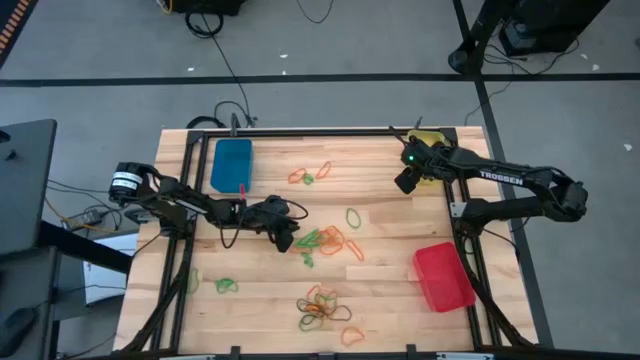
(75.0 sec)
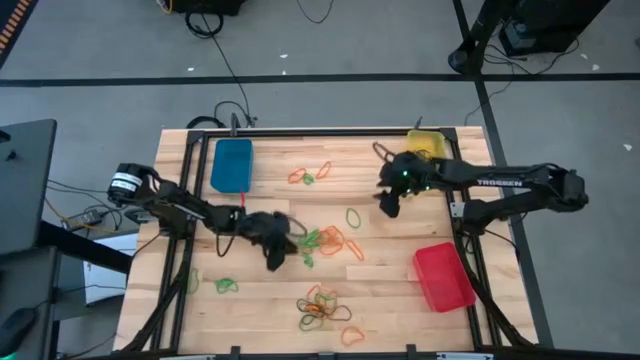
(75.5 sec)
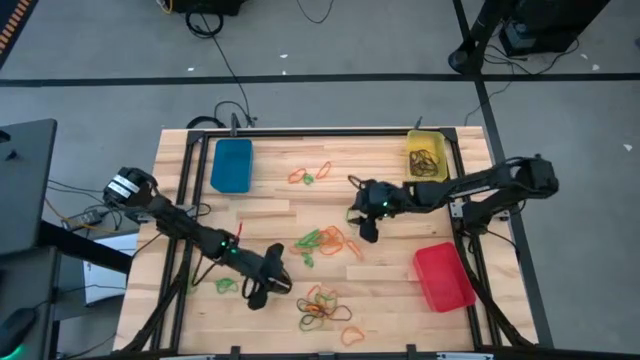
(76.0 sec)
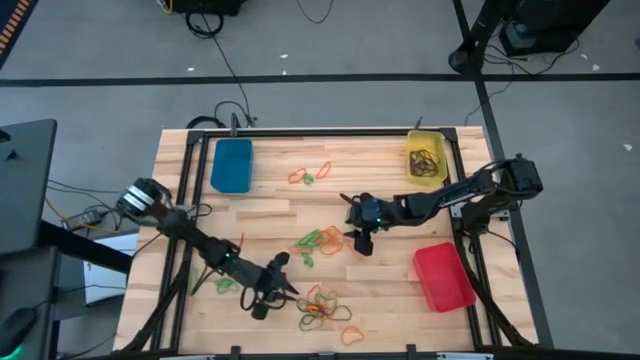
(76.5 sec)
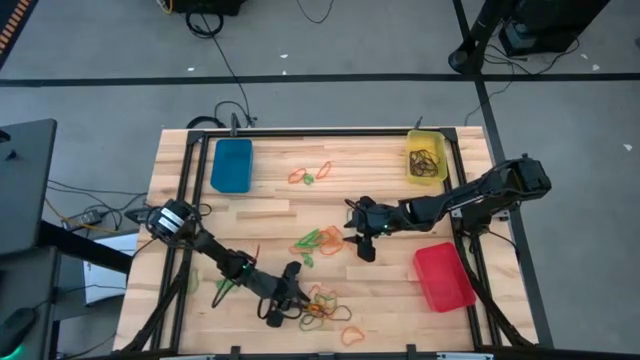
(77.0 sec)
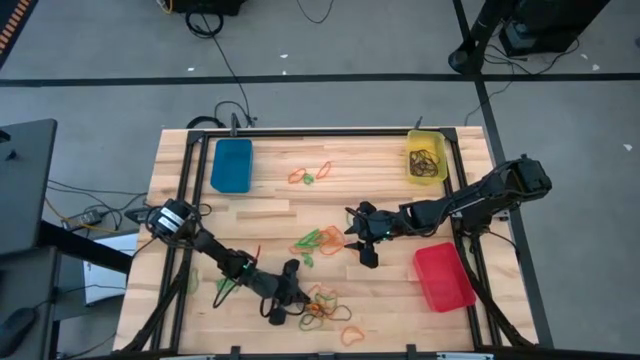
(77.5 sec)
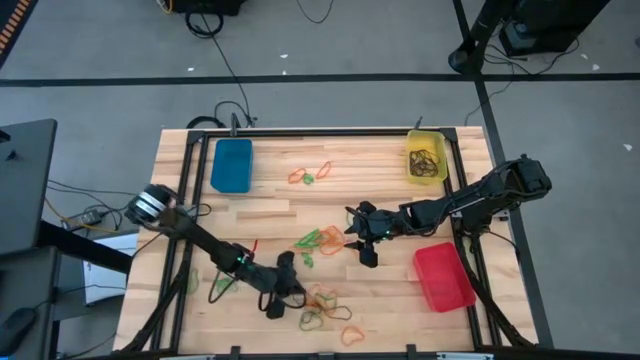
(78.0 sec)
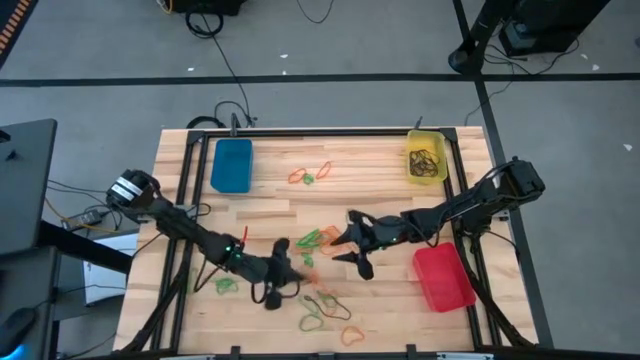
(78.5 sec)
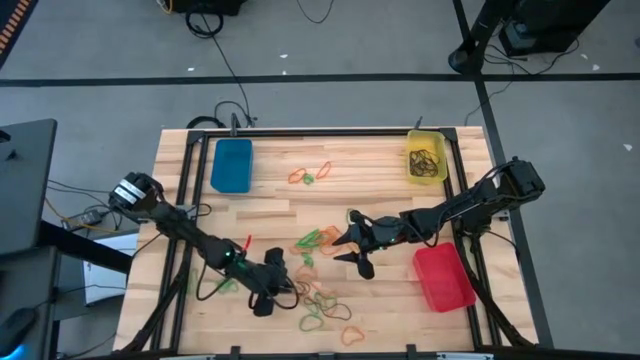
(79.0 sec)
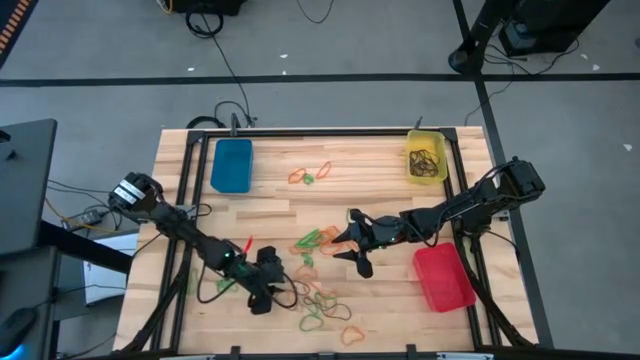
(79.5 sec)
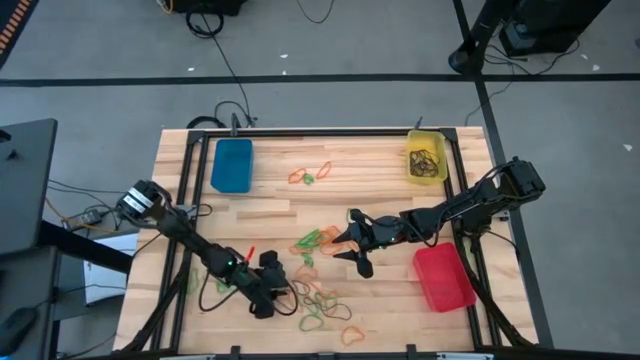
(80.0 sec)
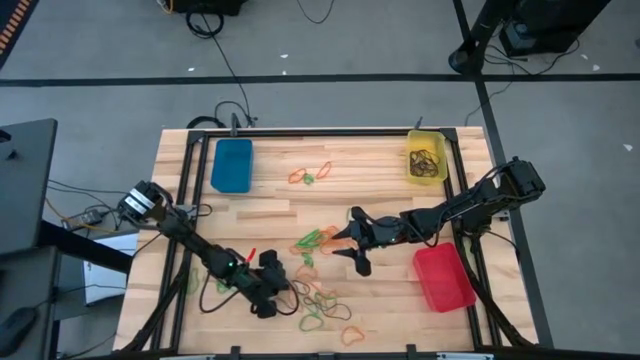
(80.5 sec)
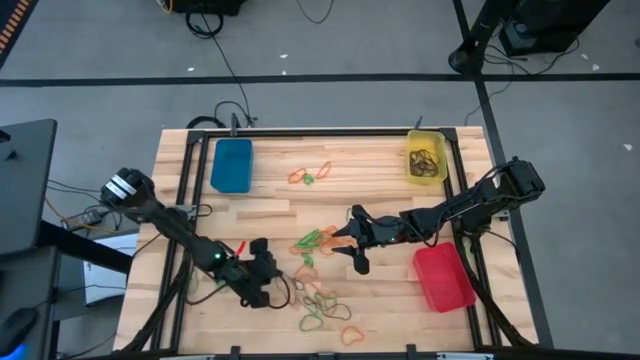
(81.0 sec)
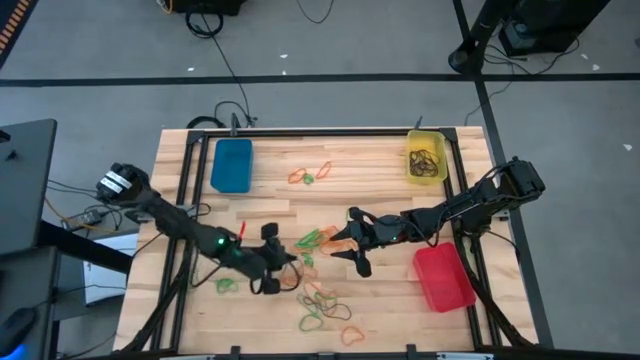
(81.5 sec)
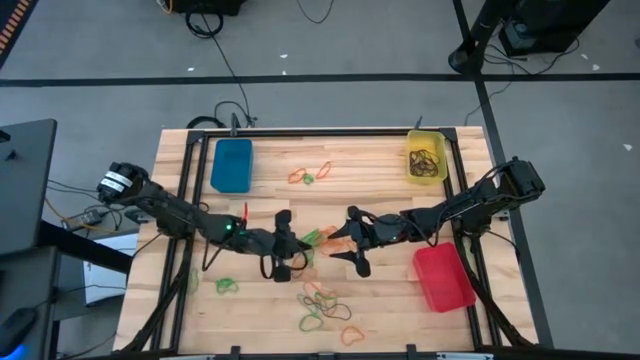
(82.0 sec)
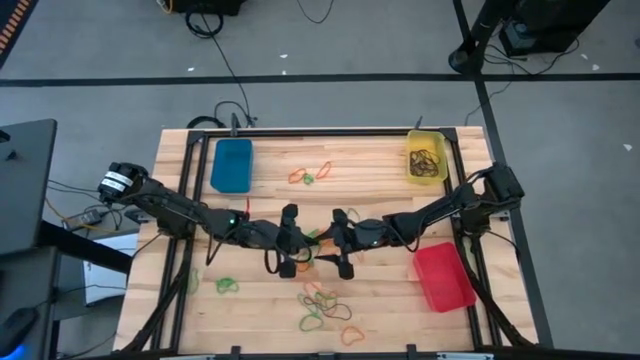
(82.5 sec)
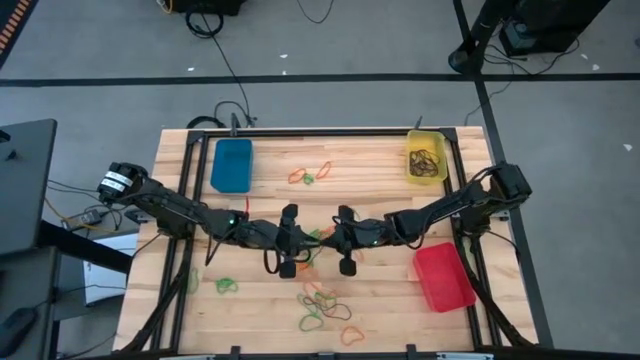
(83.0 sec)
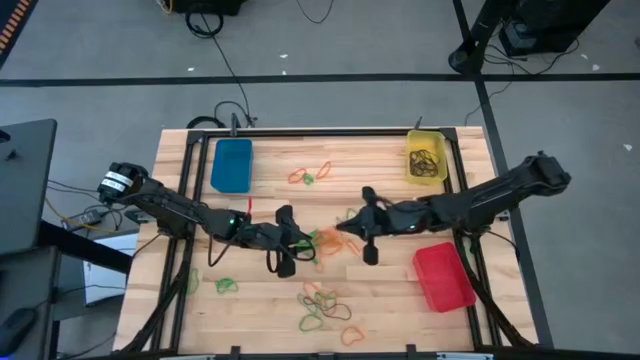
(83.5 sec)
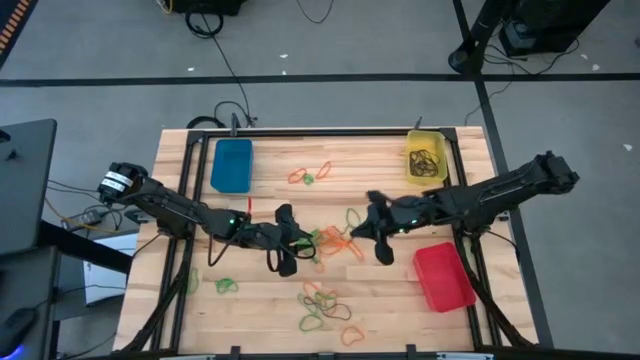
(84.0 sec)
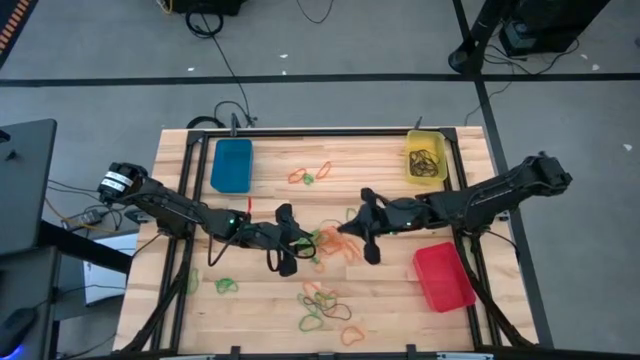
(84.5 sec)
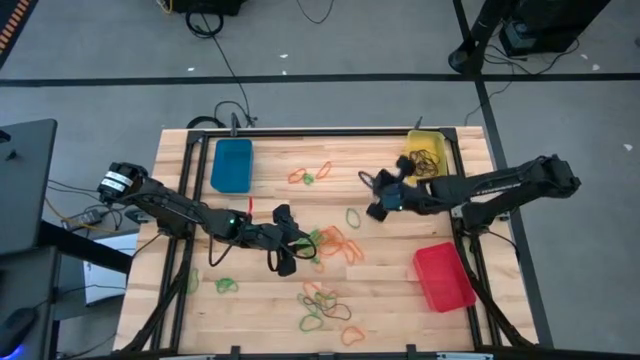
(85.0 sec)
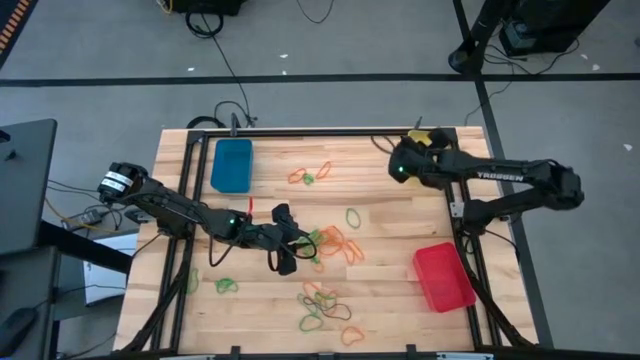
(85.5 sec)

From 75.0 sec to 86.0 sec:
Task: Sort rubber bands into baskets
Put the brown rubber band into the yellow bin

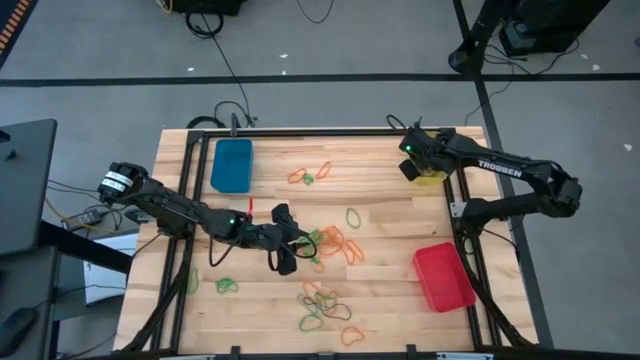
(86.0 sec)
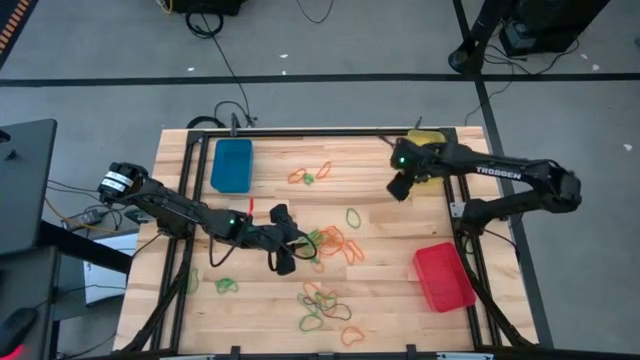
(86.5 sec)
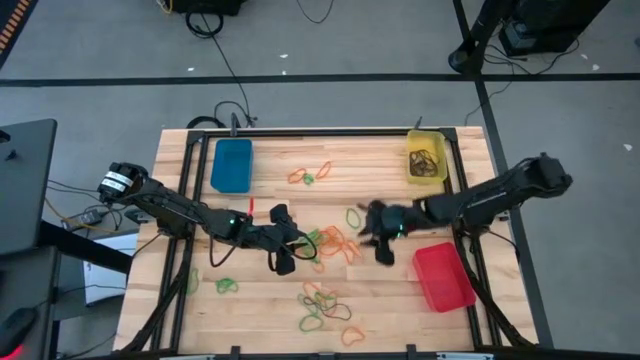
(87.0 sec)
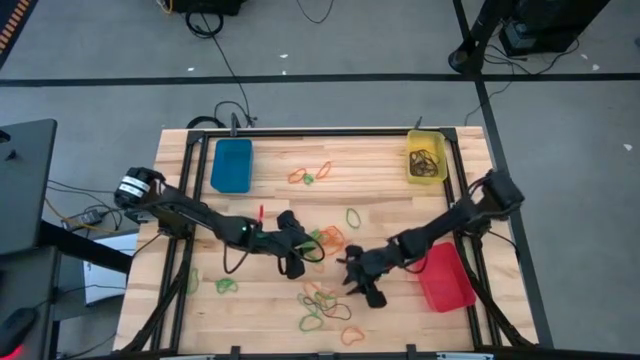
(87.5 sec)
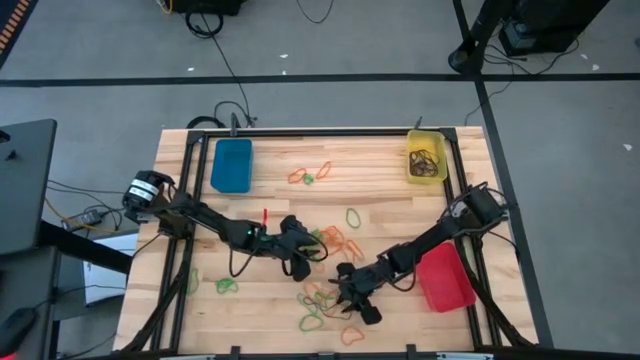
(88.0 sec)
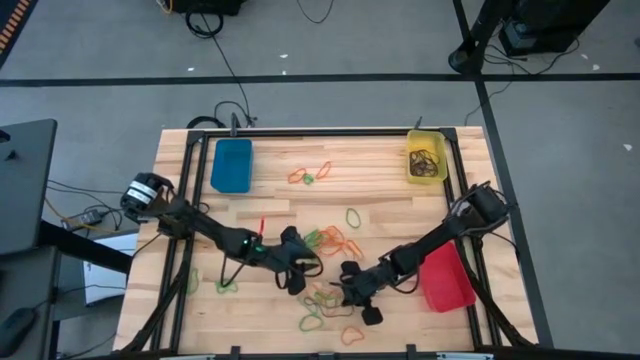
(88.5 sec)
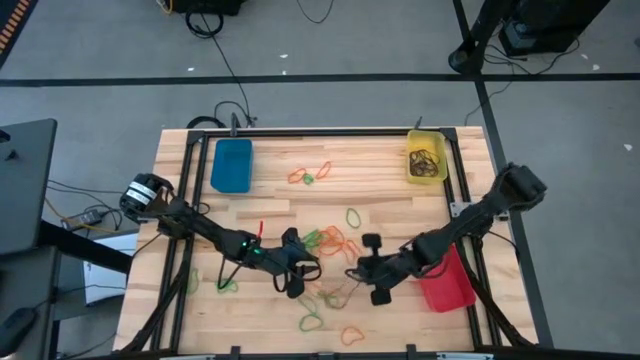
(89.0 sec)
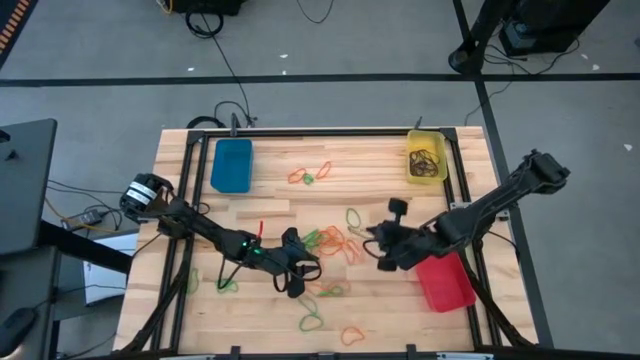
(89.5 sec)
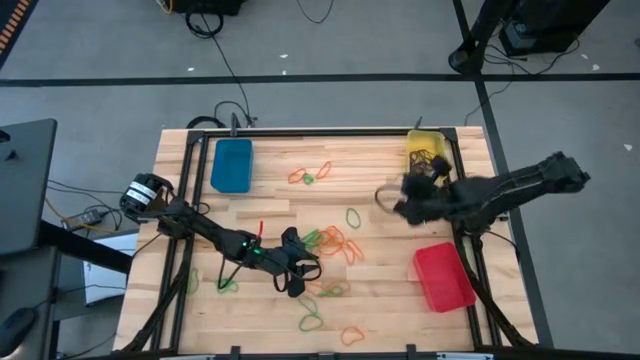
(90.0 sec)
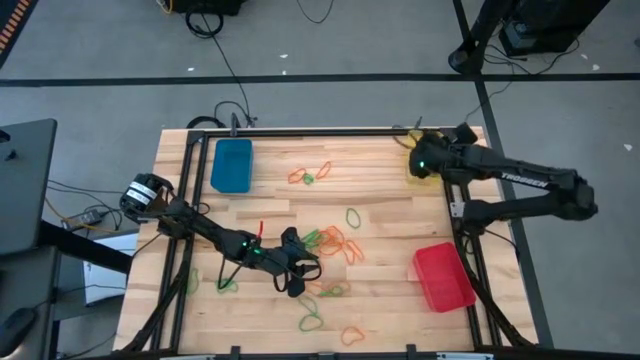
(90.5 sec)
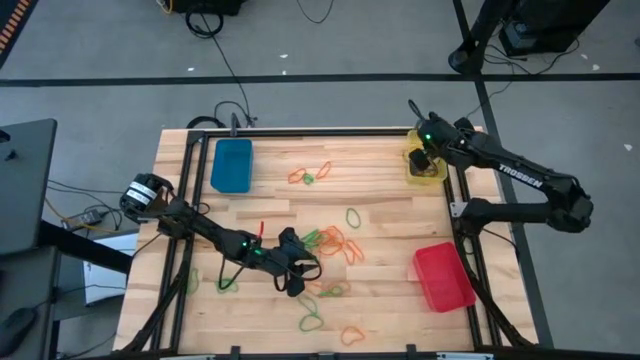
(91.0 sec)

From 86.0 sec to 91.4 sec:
Put the brown rubber band into the yellow bin

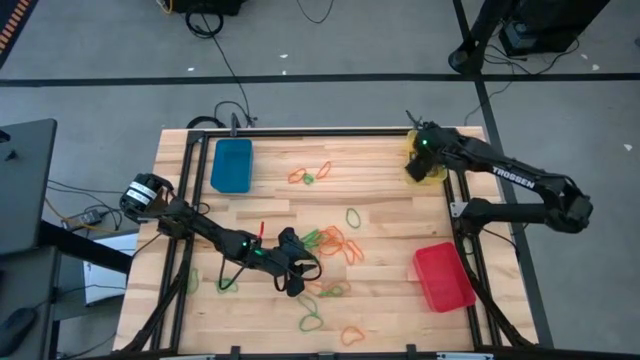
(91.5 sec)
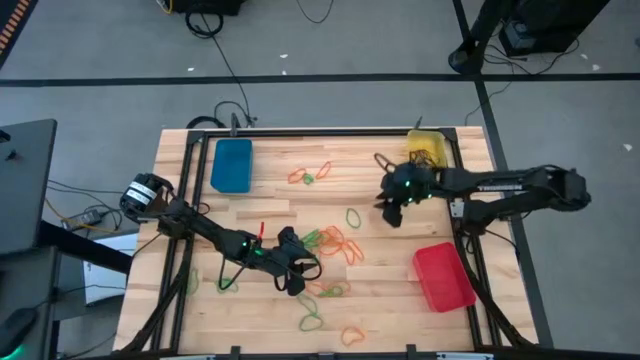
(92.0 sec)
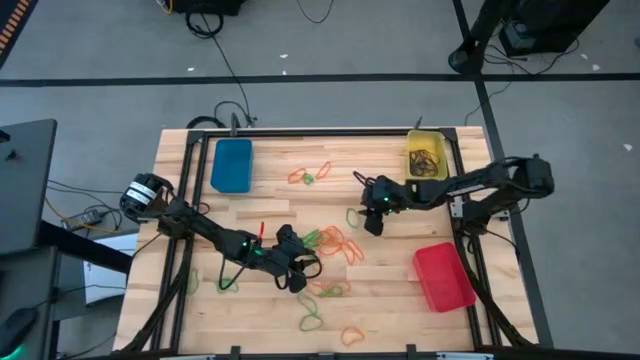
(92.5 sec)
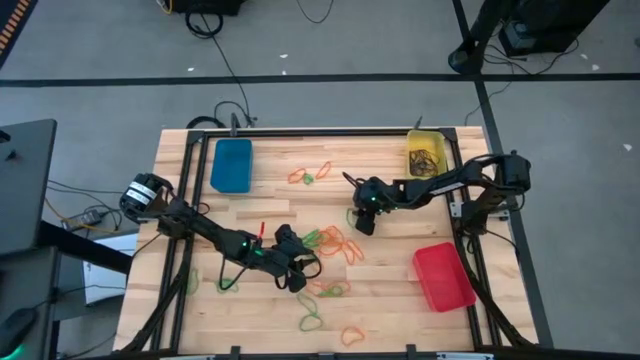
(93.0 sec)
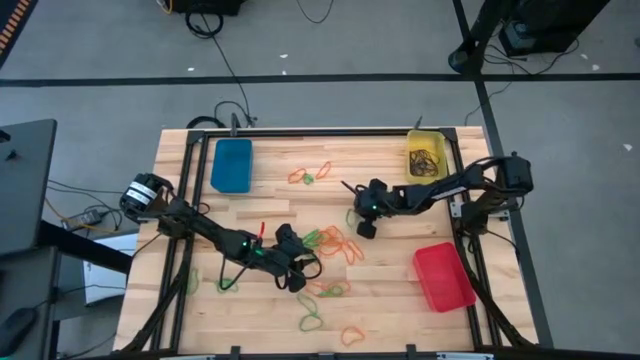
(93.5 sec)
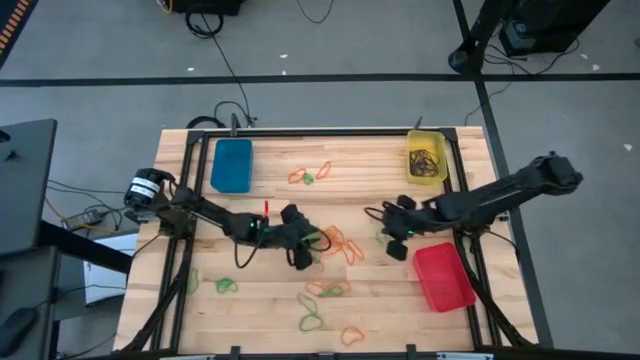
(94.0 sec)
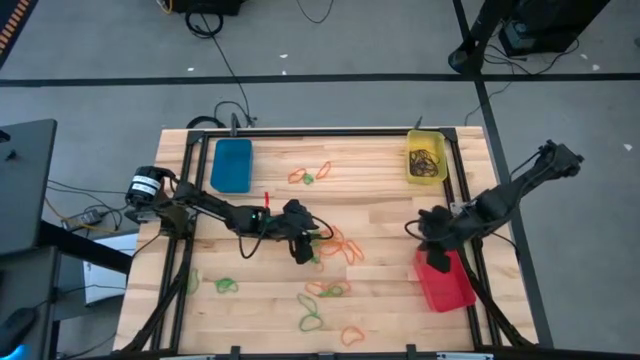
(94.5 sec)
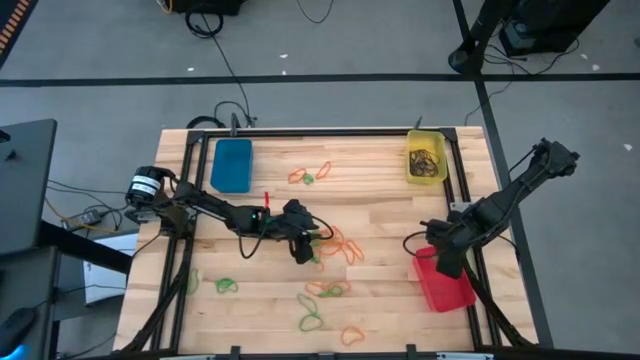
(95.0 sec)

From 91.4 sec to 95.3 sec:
Put the green rubber band into the red bin

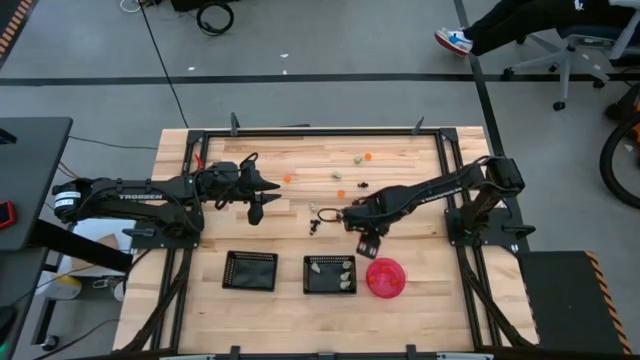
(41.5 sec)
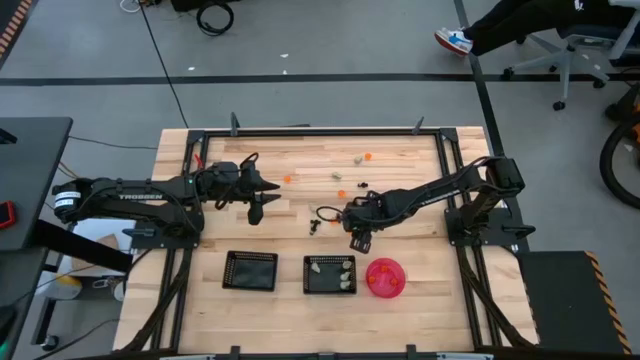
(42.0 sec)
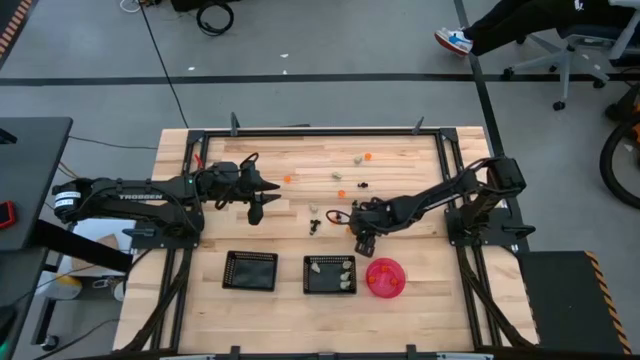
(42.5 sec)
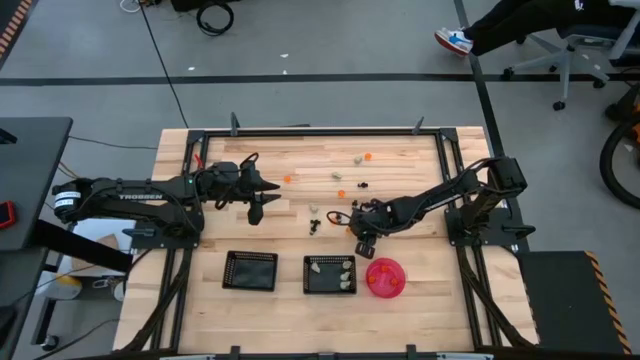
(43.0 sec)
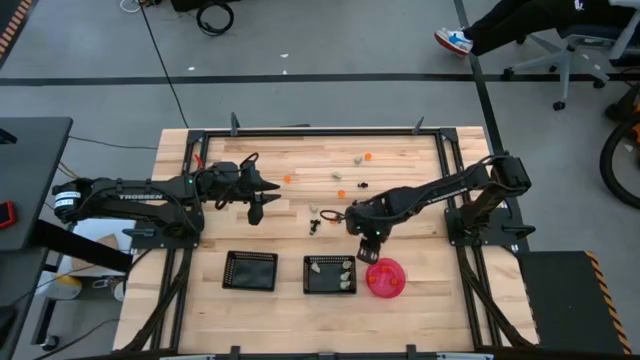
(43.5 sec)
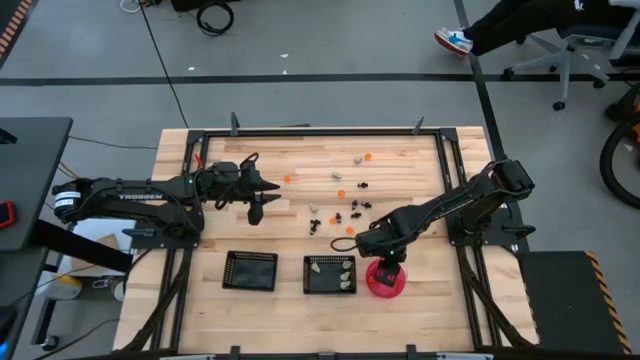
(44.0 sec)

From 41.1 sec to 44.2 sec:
Task: Sort Halloween decoration
Put the orange pumpkin toy into the pink bowl
